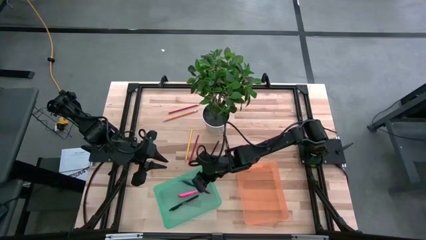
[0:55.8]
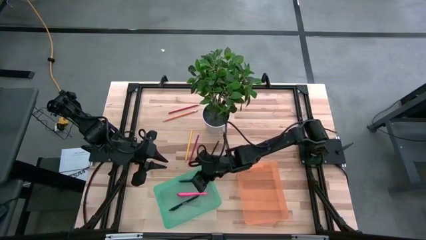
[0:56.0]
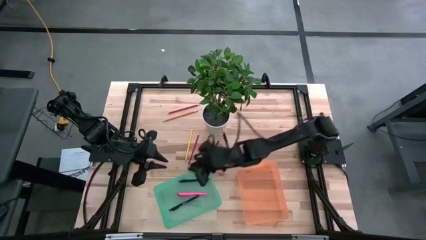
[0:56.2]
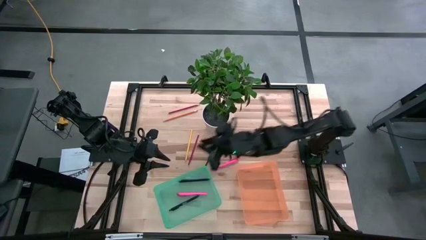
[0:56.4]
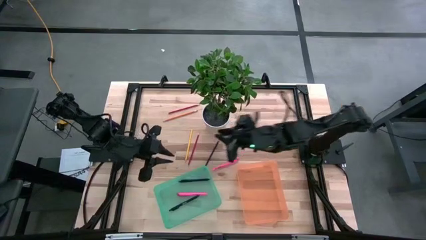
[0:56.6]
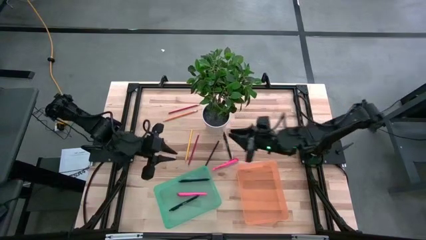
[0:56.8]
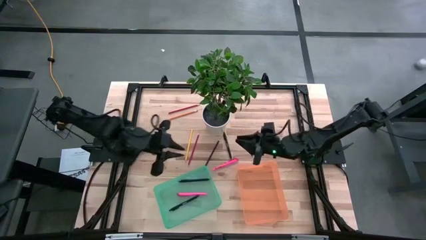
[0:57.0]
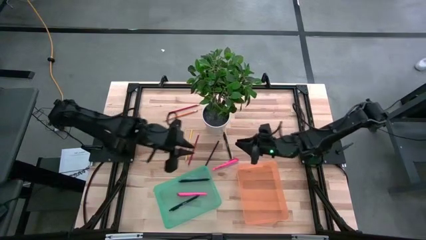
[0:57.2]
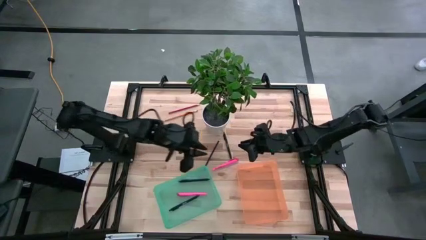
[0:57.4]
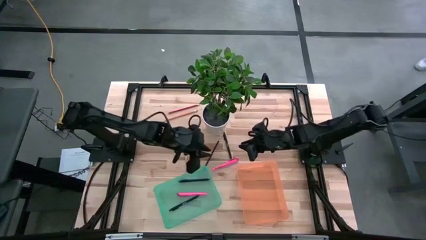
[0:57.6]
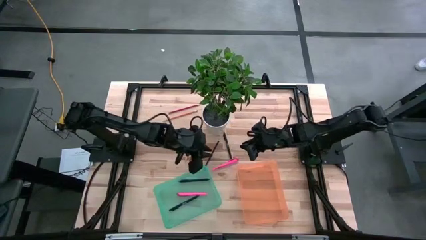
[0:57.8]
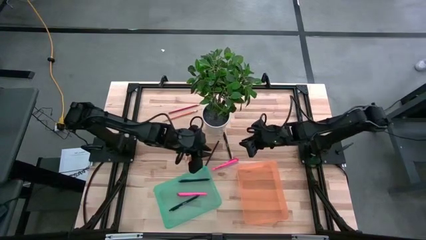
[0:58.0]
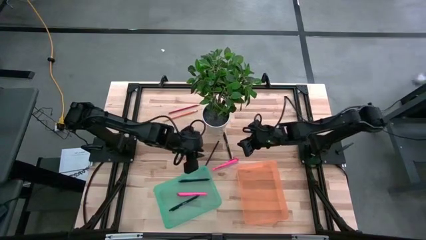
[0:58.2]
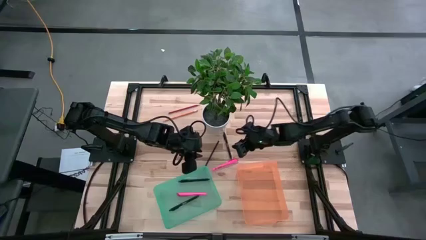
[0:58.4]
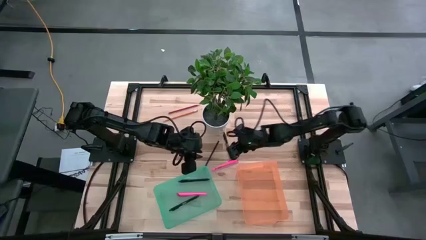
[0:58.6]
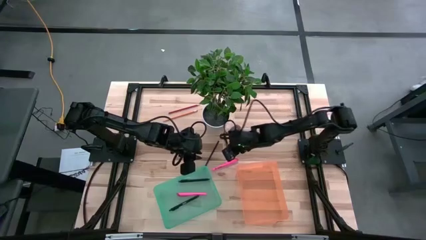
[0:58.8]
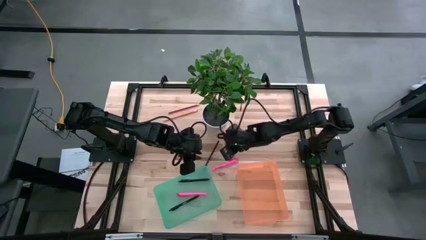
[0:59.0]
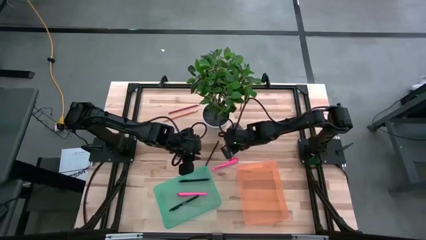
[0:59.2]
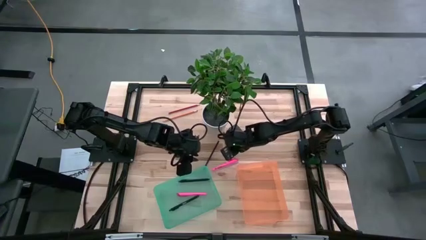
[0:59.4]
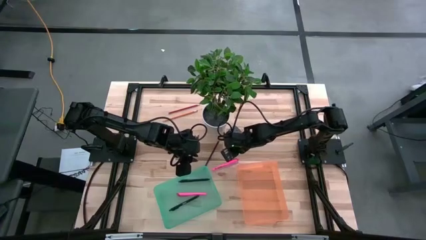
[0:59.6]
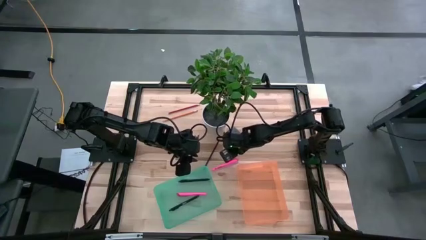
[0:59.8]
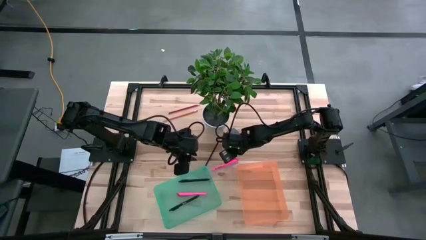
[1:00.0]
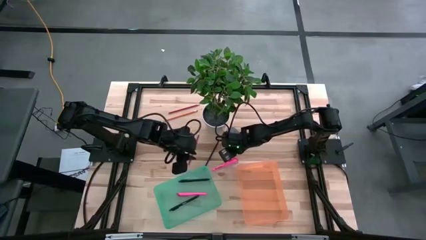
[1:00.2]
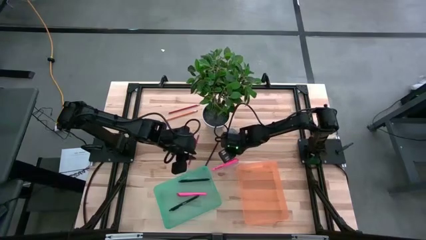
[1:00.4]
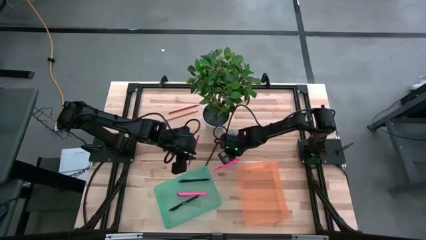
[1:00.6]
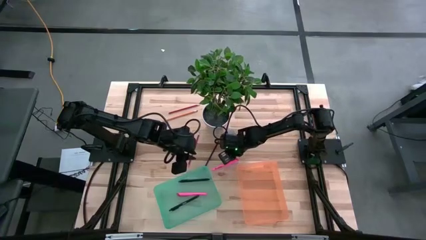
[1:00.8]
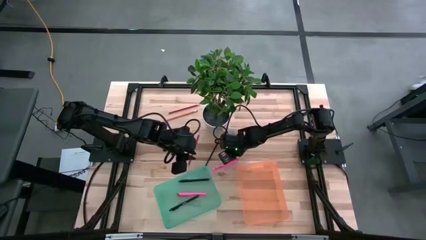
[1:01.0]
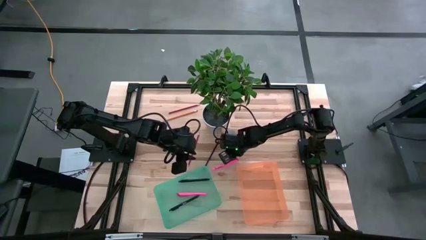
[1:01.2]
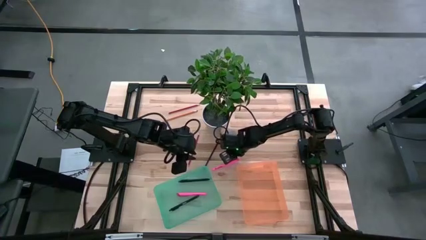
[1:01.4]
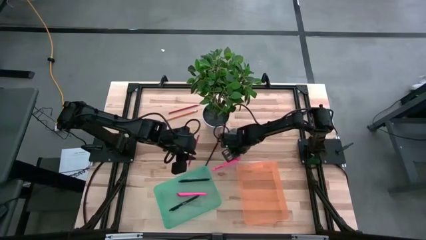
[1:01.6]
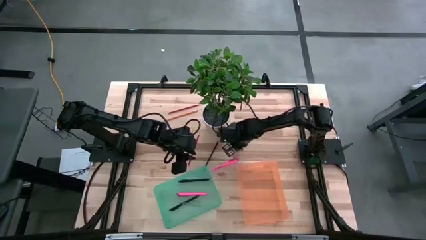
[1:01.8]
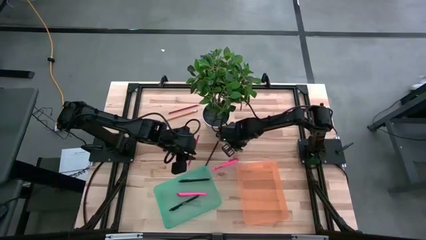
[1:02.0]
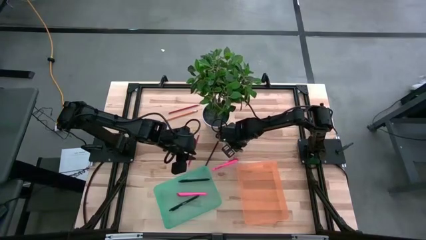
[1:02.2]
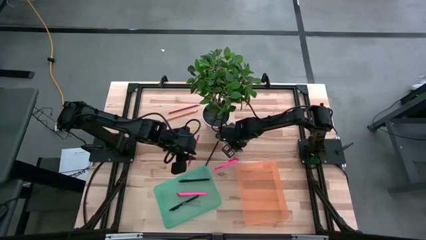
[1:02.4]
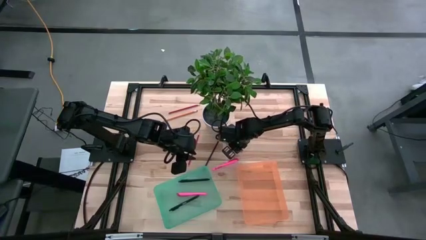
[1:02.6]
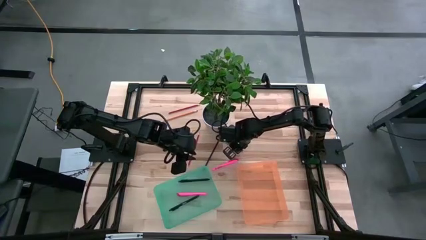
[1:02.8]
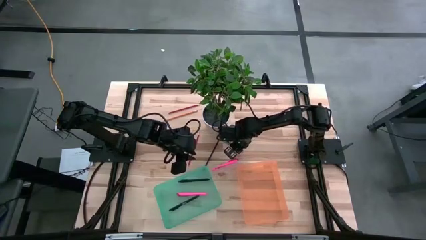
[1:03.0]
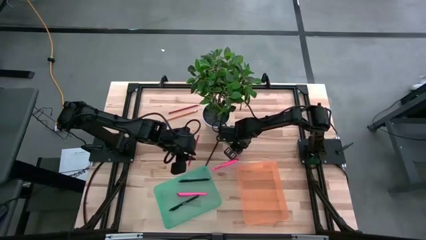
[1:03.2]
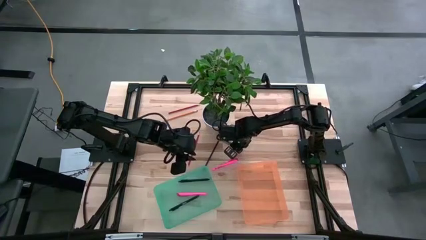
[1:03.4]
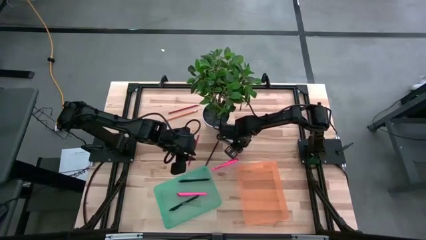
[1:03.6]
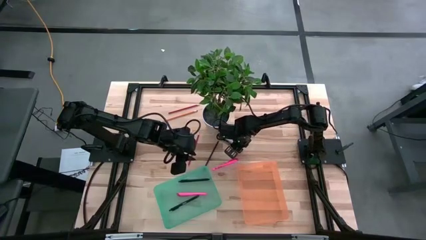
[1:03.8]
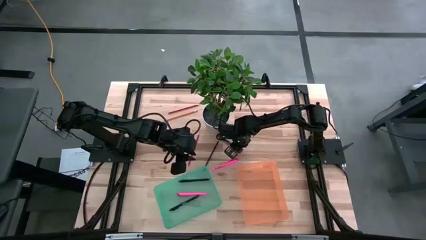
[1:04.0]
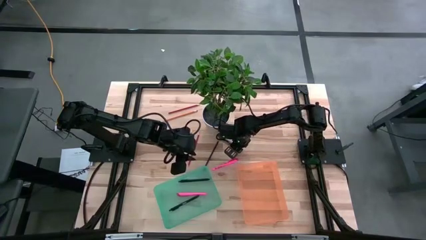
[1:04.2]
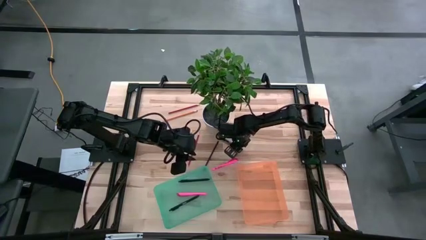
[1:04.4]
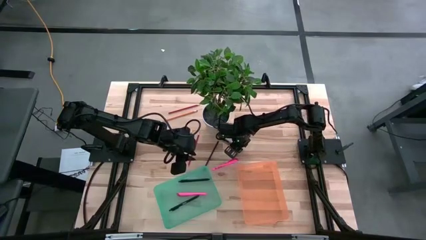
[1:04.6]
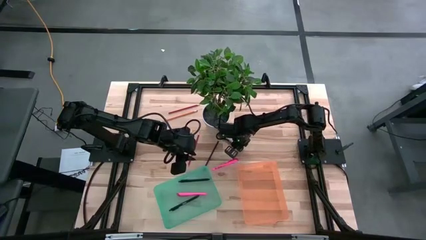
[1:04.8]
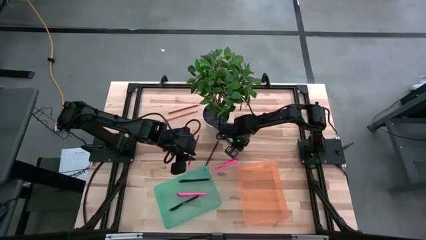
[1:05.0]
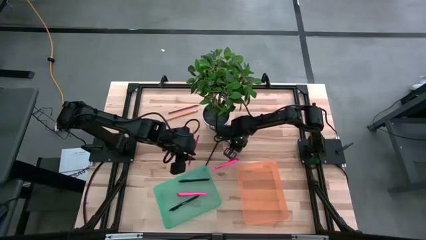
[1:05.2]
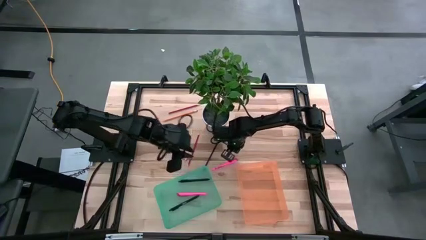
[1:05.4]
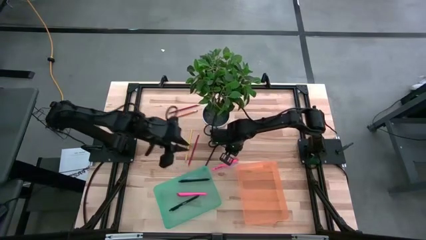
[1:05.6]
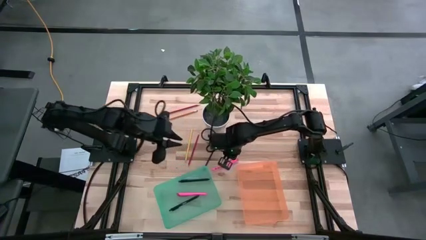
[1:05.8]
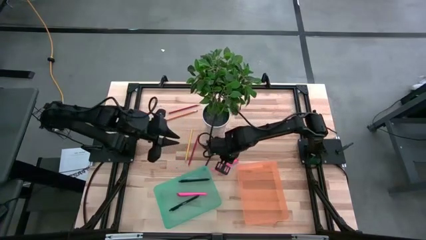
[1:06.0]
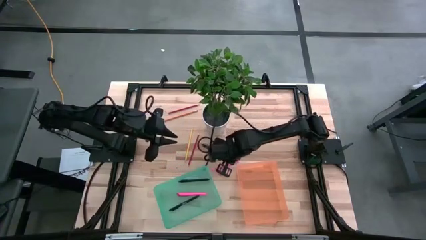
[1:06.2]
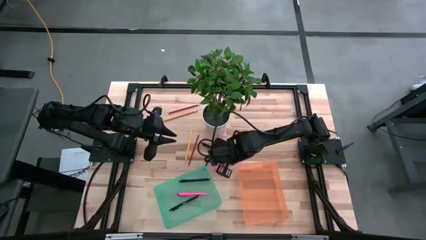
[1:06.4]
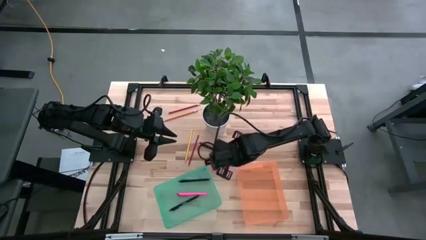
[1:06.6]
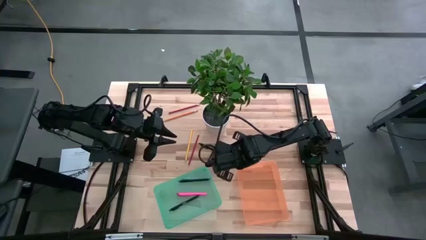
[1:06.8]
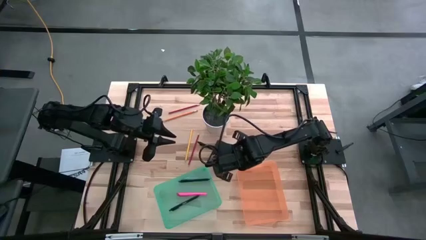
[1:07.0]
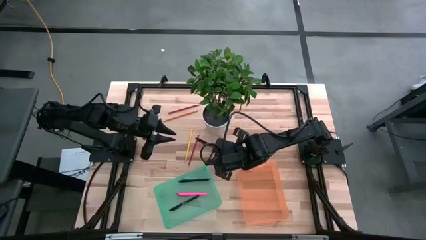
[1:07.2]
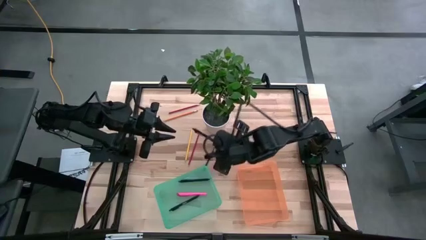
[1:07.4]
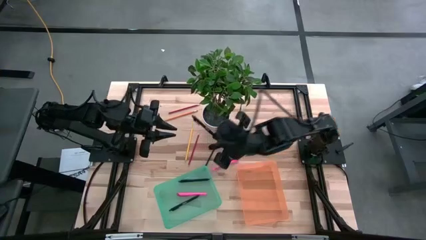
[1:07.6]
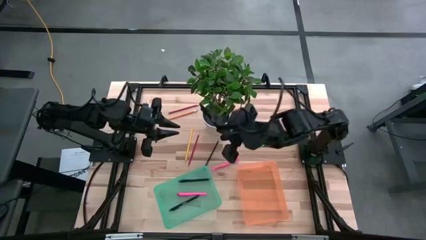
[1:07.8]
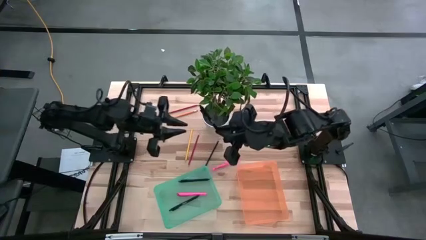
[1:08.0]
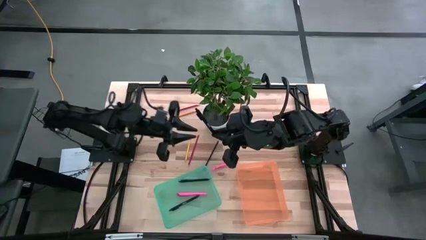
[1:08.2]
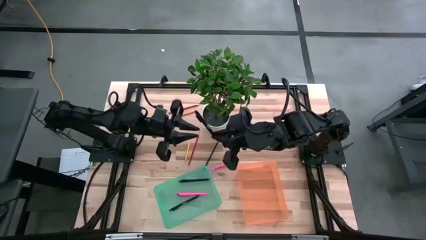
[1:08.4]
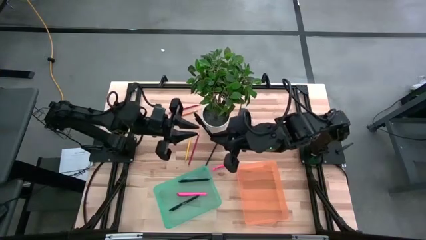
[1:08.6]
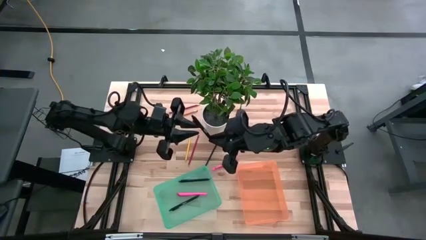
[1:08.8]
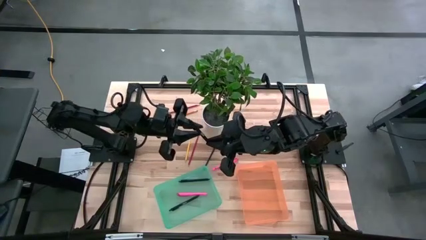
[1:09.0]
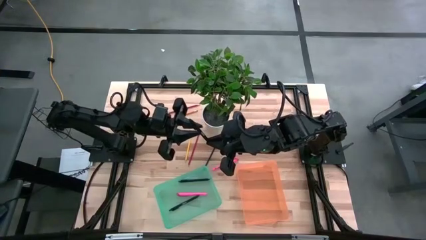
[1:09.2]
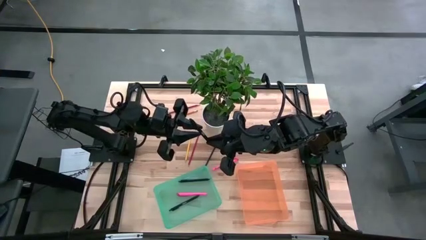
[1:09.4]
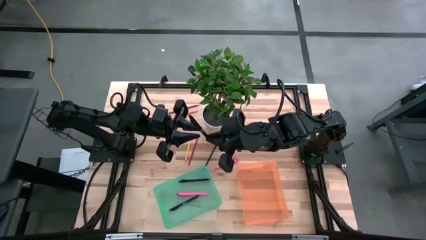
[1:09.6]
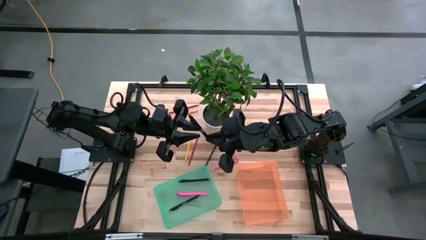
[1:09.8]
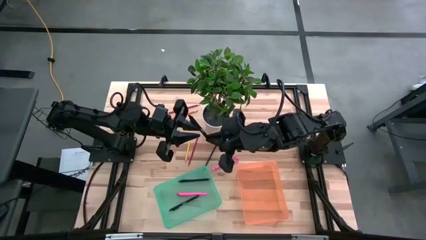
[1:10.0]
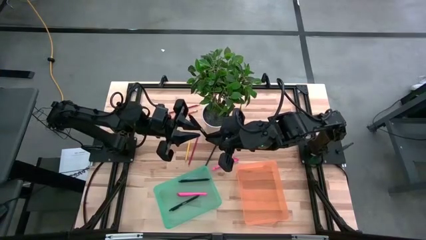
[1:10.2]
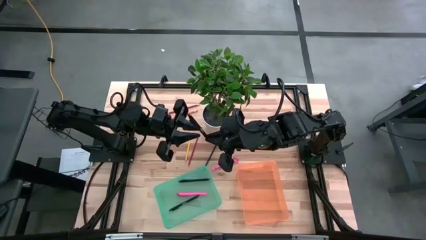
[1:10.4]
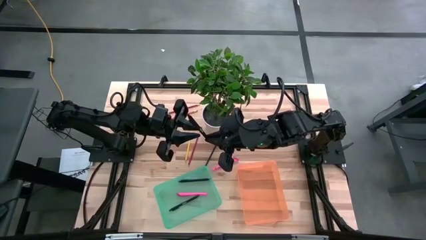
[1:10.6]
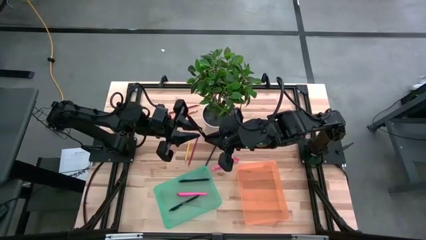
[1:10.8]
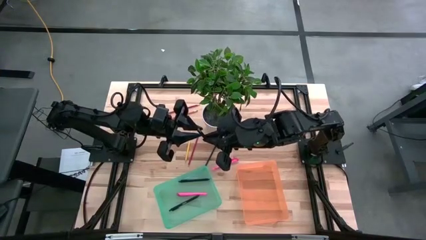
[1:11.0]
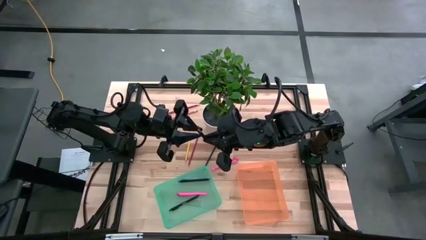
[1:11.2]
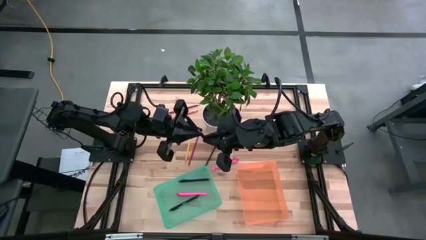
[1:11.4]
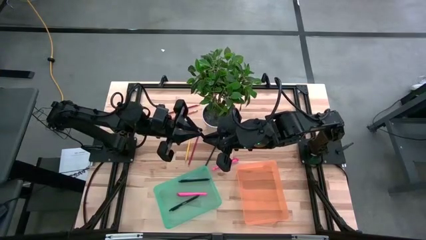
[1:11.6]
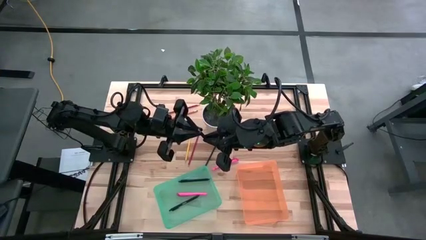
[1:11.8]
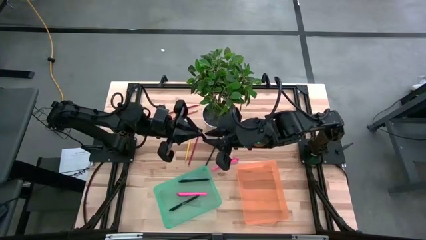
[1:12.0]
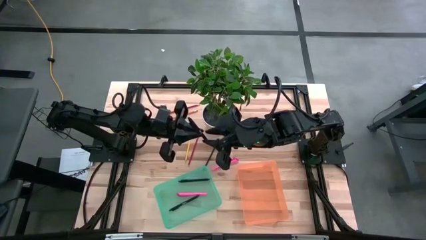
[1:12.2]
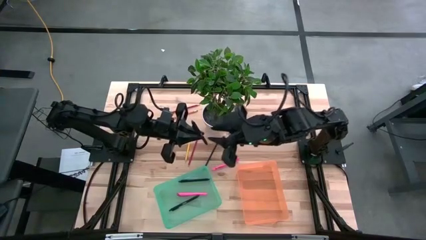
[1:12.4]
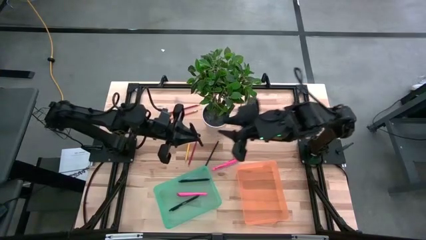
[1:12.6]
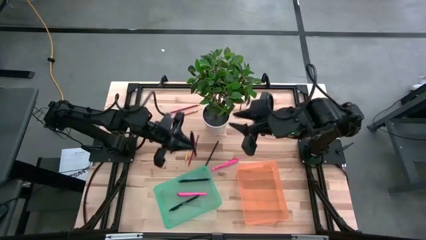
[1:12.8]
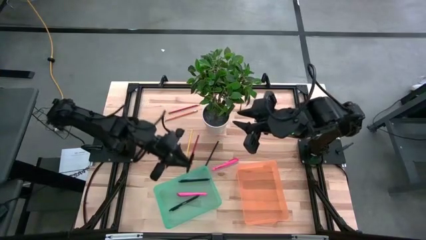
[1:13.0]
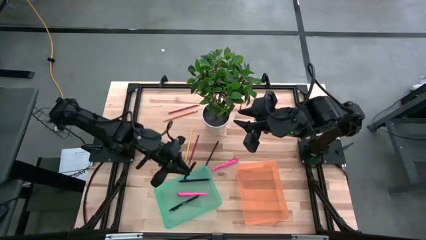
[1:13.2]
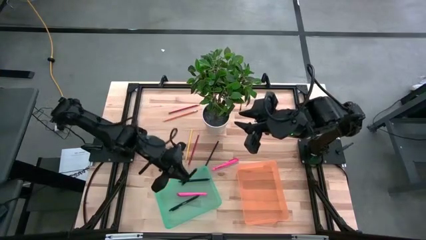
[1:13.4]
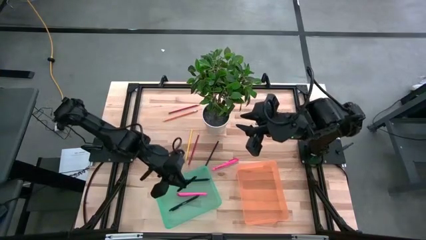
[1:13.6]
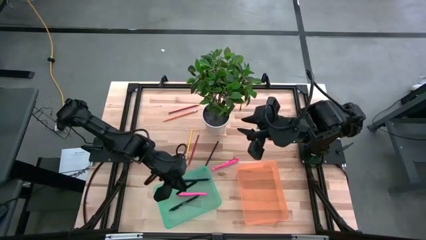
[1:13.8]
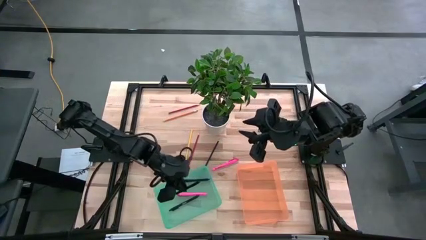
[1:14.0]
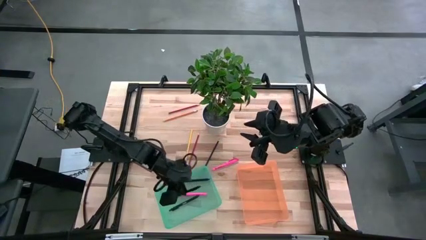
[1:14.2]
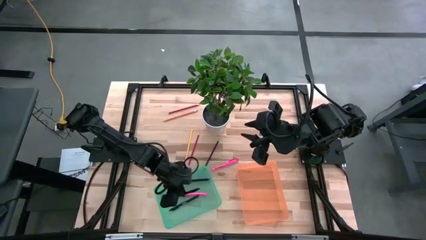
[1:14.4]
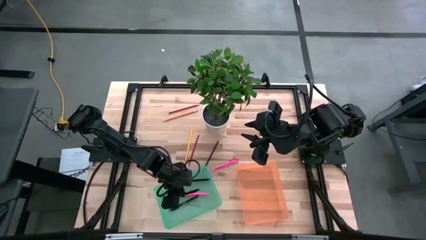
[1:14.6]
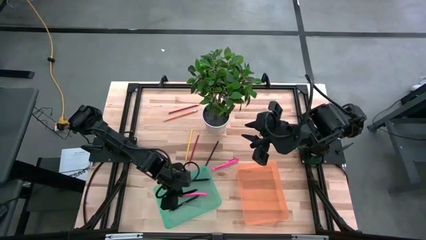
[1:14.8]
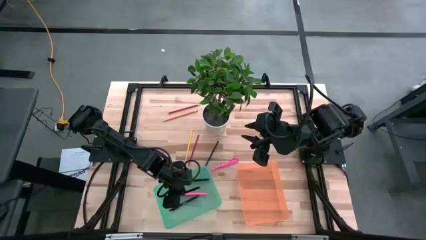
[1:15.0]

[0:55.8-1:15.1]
Task: Sort pens & pencils
Put the black pen into the green bin
